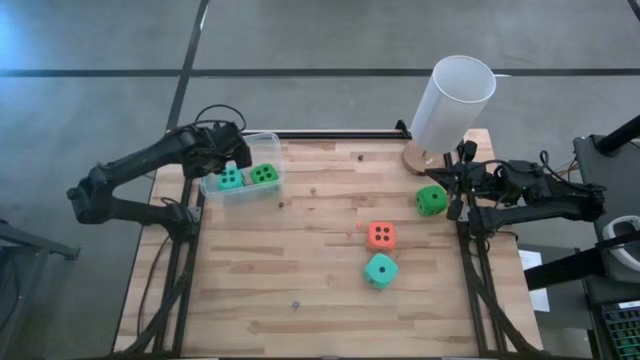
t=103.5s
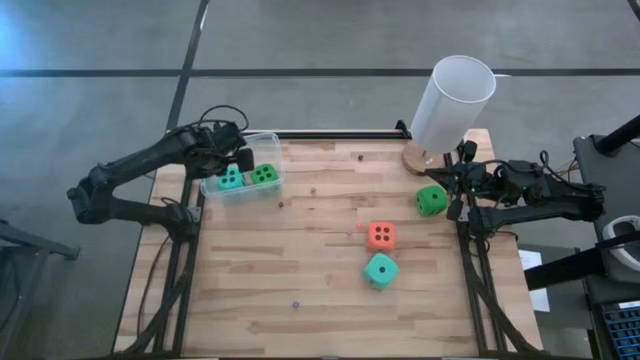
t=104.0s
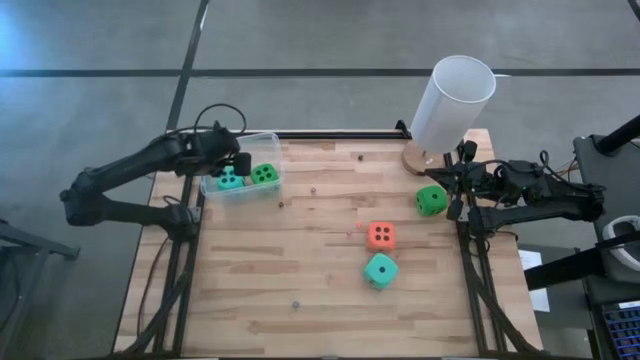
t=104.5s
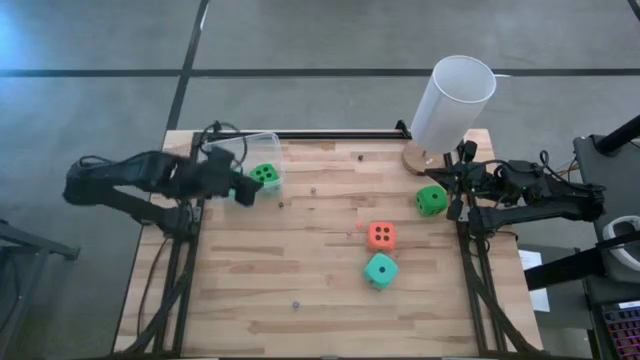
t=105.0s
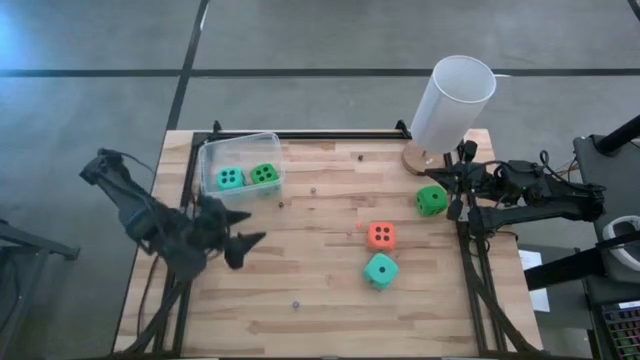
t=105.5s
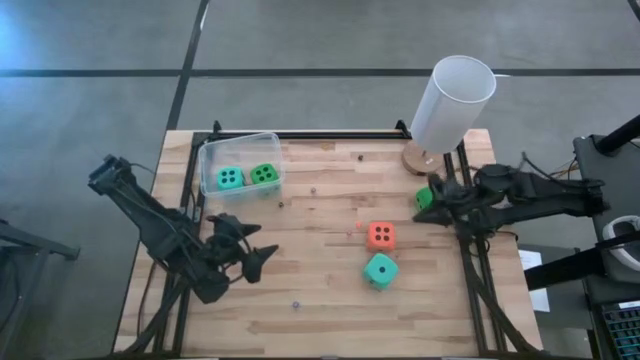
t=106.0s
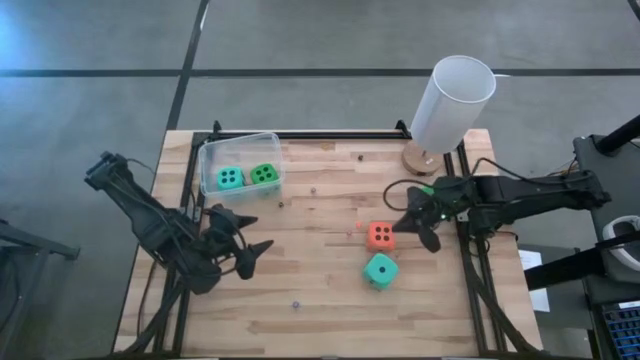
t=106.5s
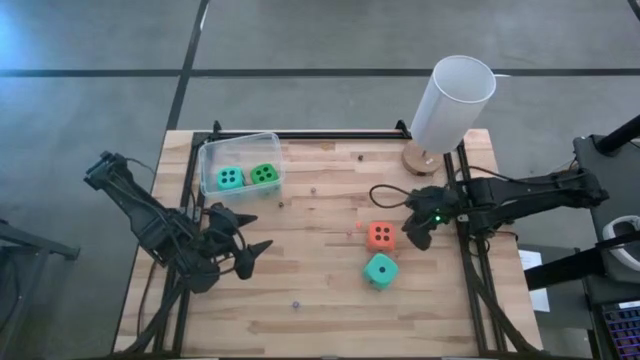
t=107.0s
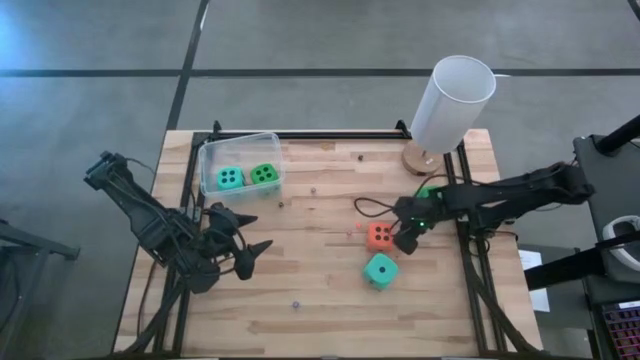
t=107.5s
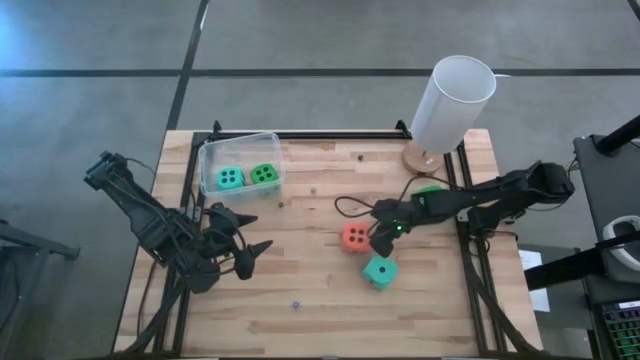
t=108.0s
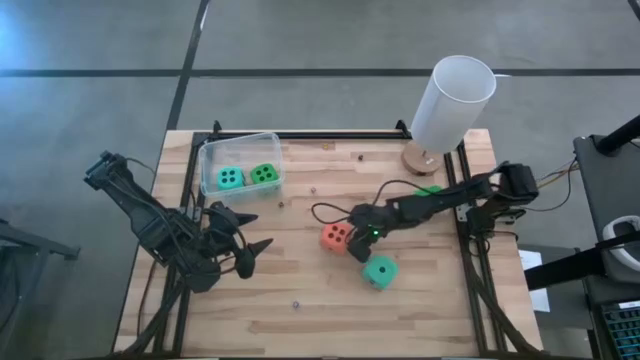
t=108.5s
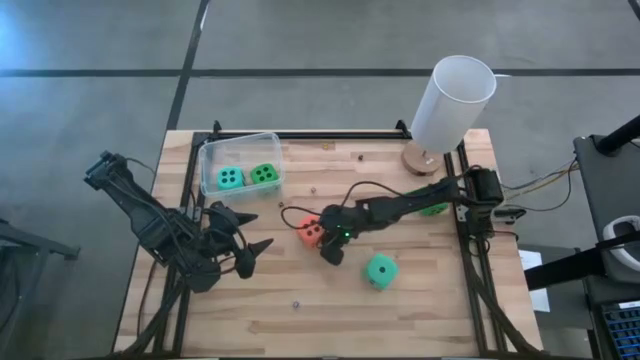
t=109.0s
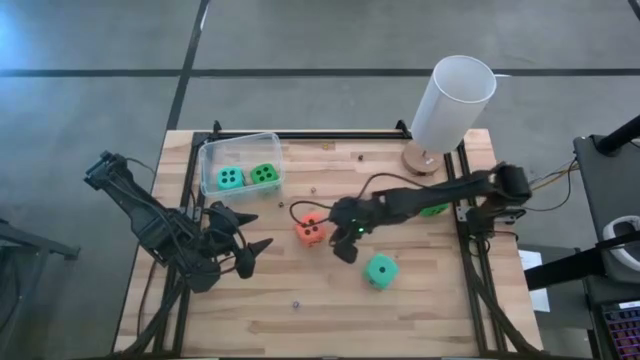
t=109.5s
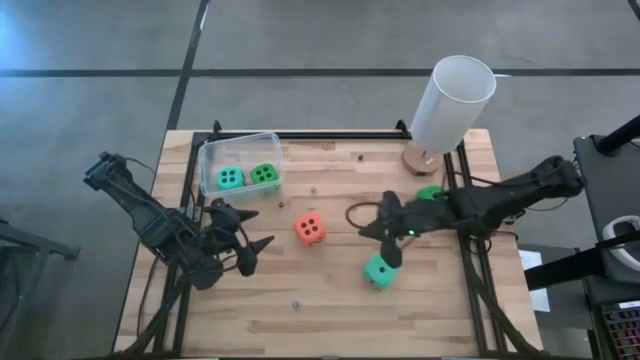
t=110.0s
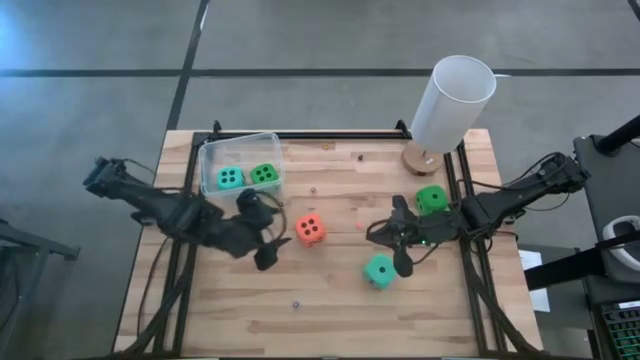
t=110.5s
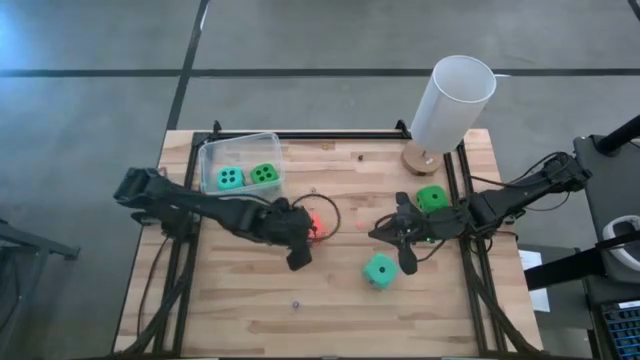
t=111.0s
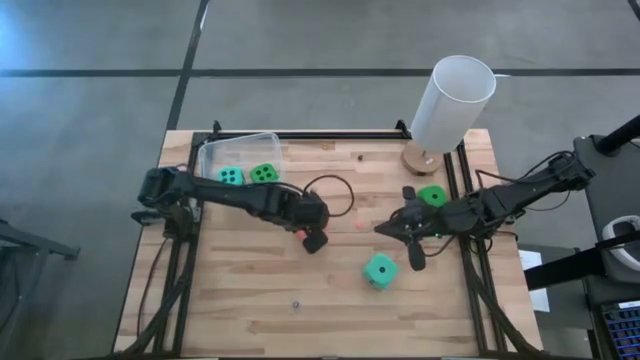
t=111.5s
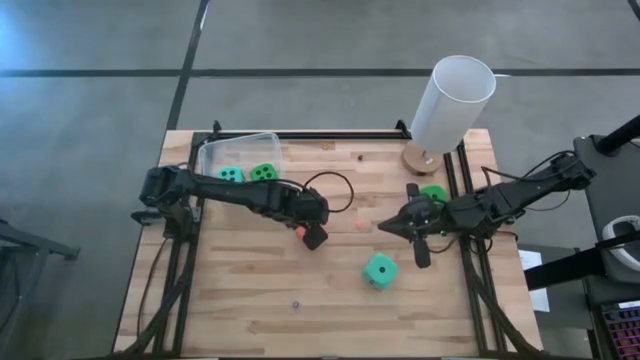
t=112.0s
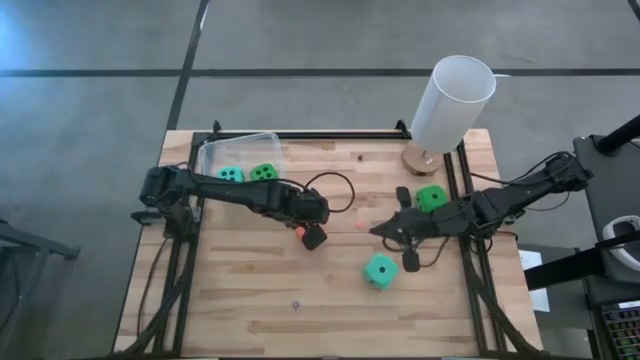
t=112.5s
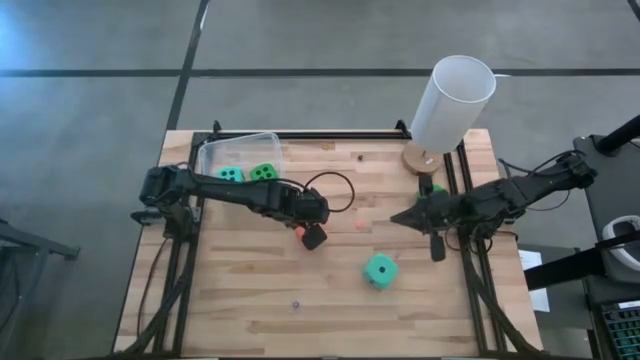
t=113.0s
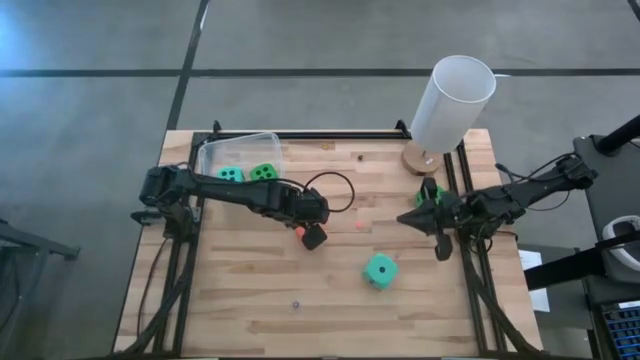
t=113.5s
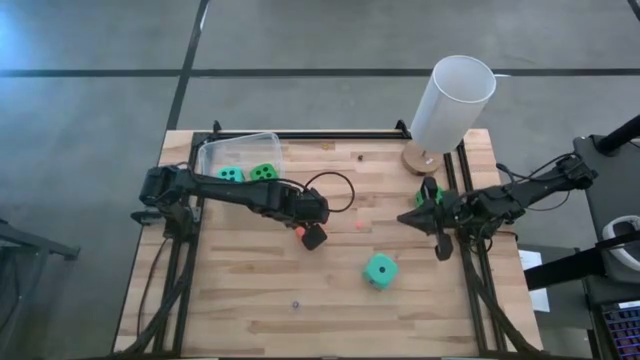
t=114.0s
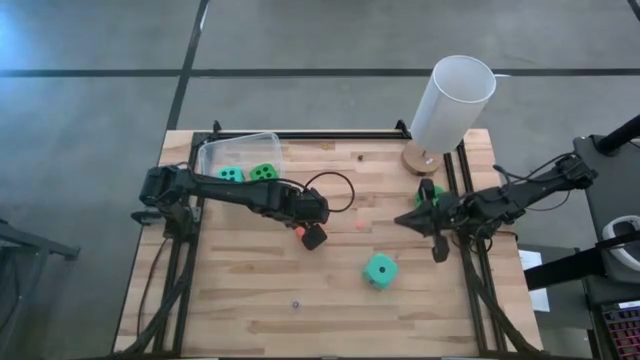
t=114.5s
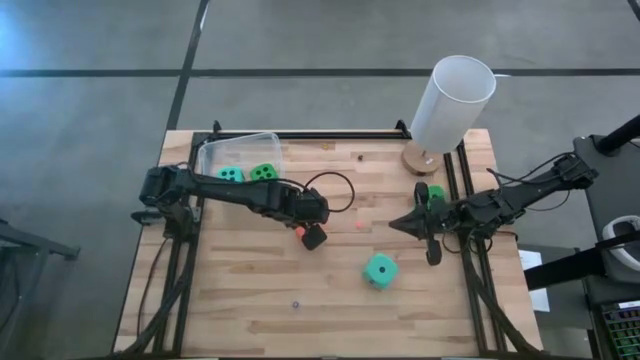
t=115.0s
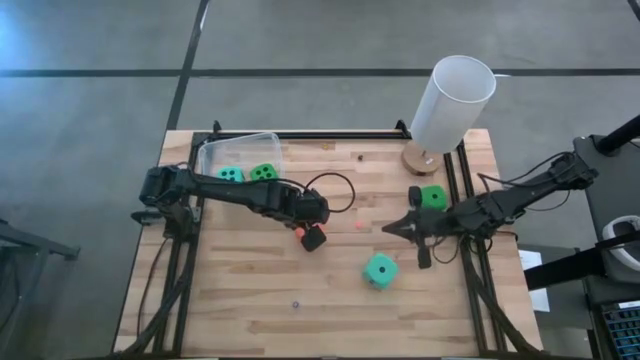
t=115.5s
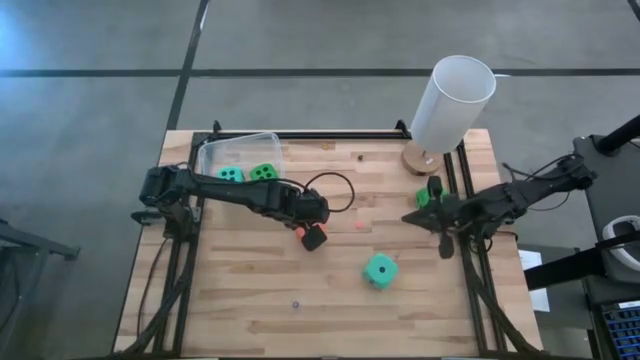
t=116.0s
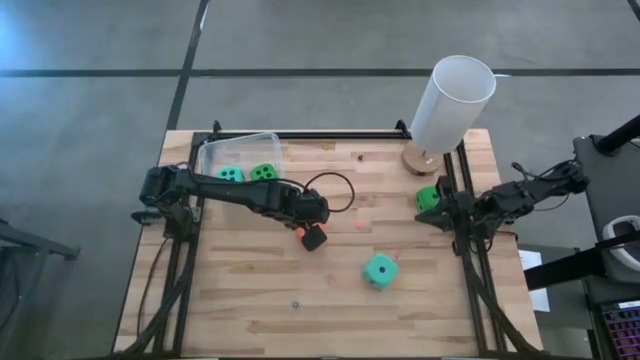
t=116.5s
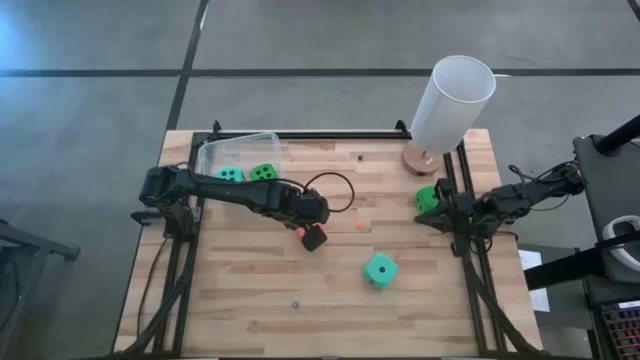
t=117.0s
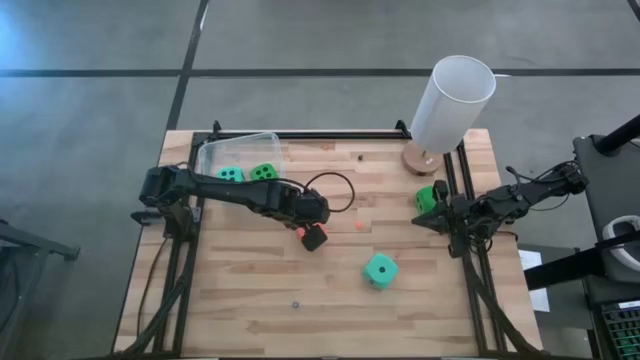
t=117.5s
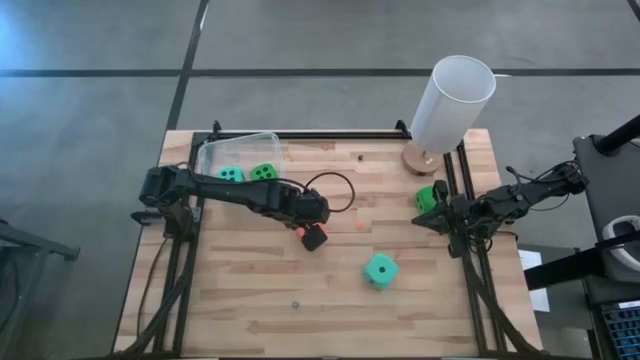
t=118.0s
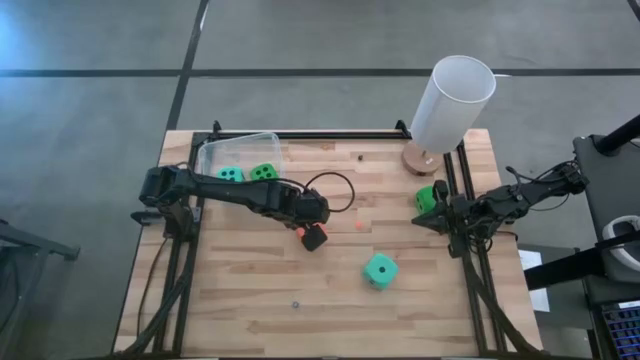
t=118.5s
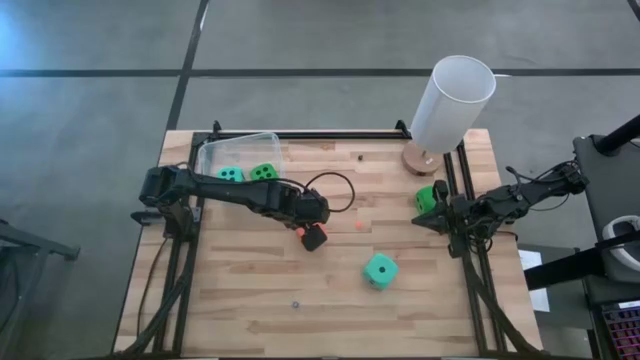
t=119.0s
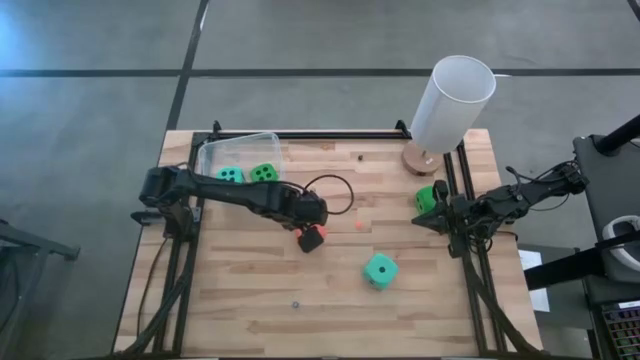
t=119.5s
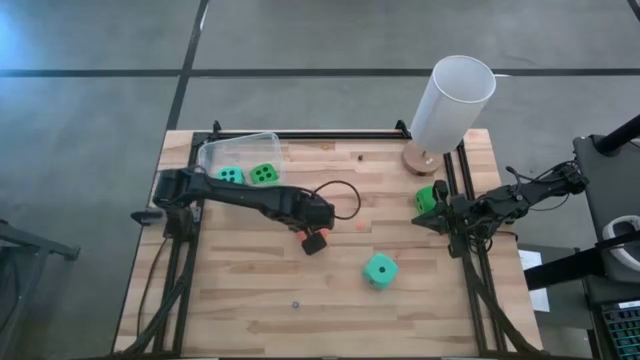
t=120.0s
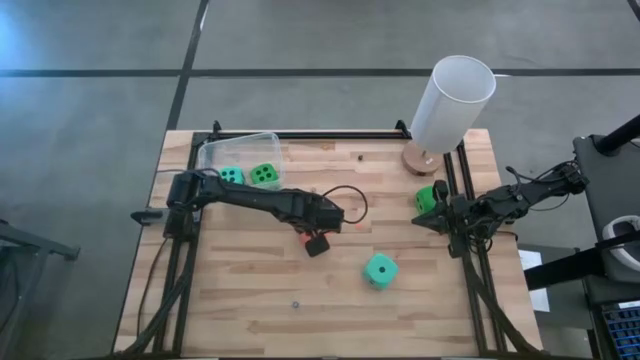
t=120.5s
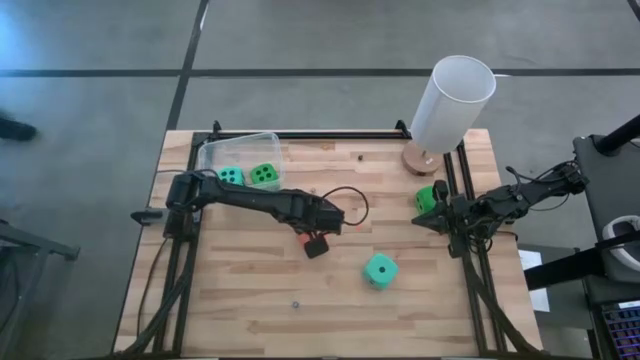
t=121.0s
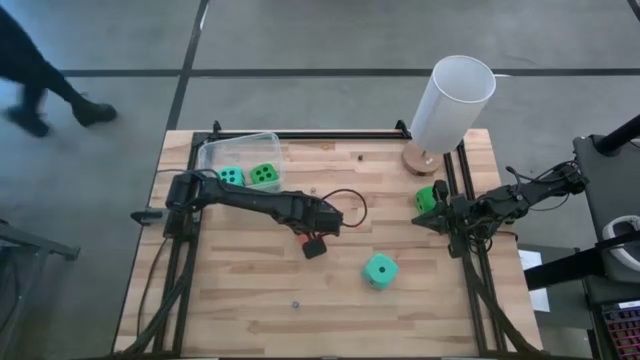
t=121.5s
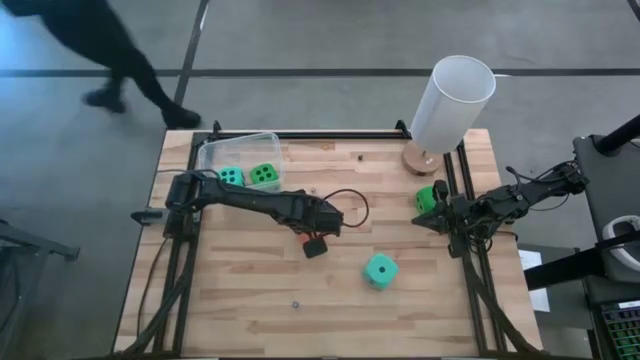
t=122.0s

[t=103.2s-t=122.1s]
Task: Pick & Place Dice
Put the orange large dice into the transparent bin

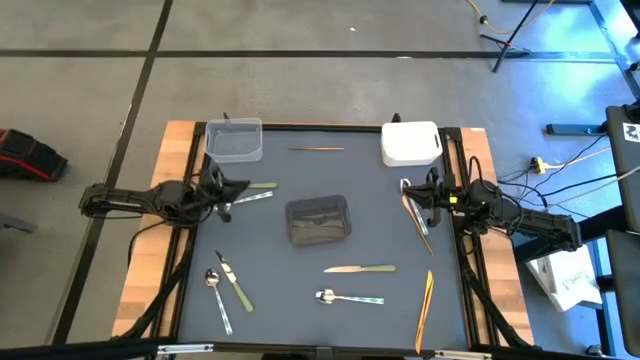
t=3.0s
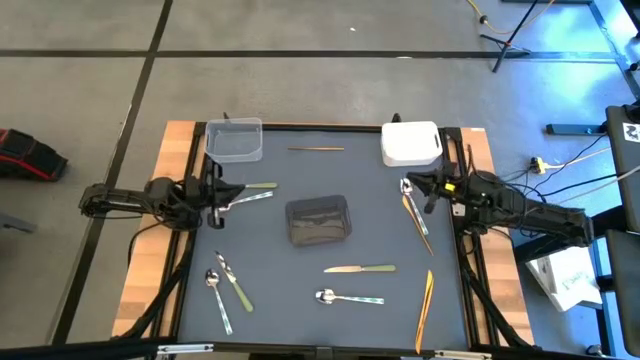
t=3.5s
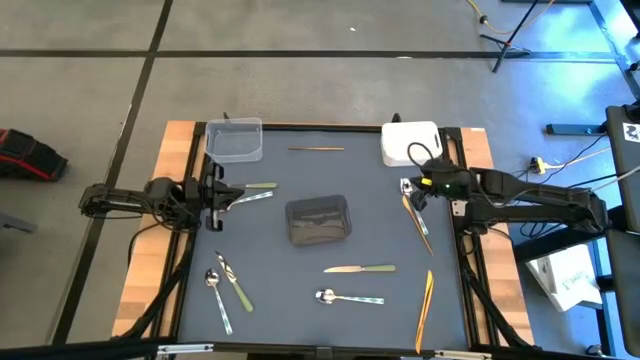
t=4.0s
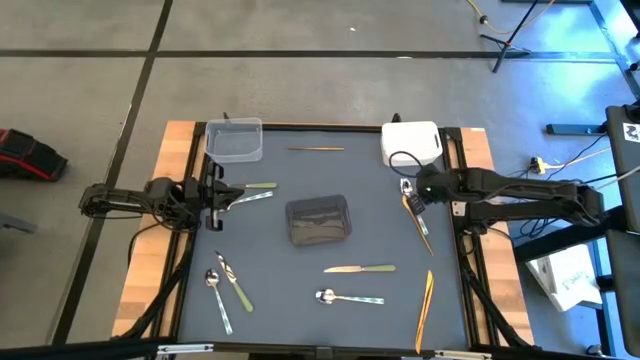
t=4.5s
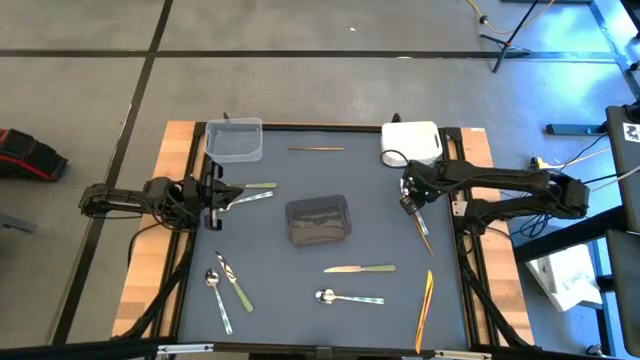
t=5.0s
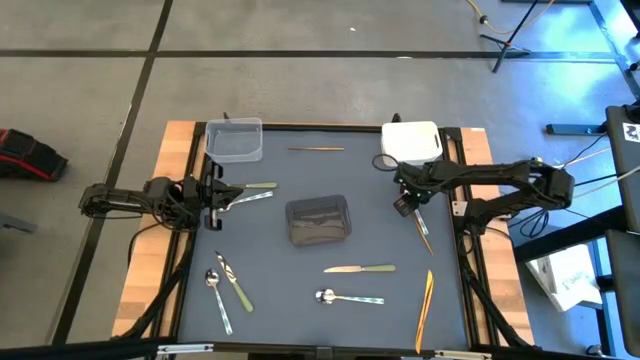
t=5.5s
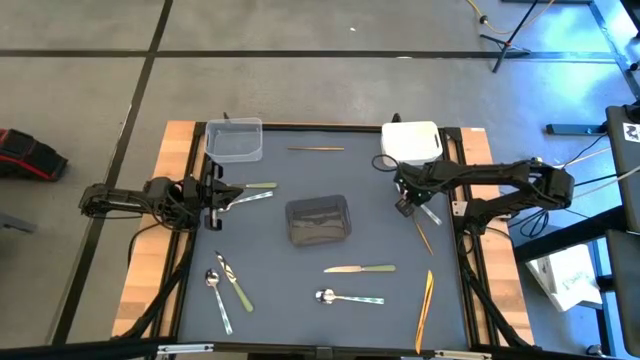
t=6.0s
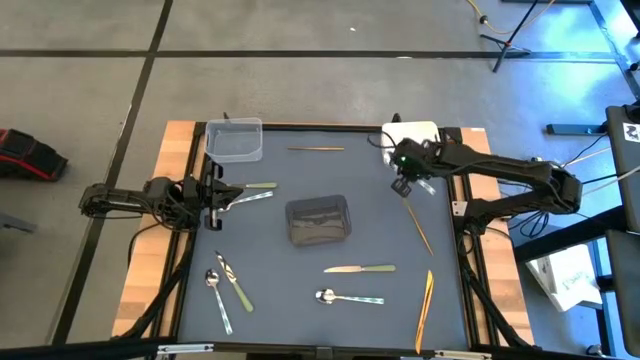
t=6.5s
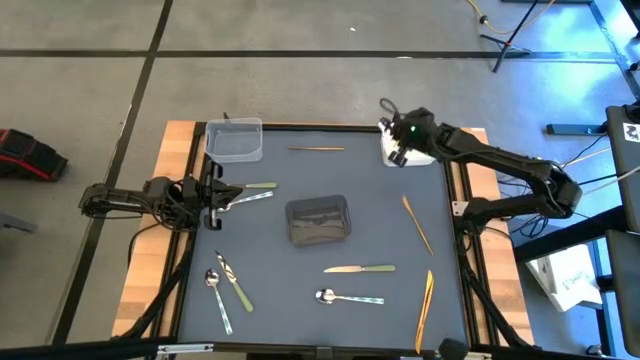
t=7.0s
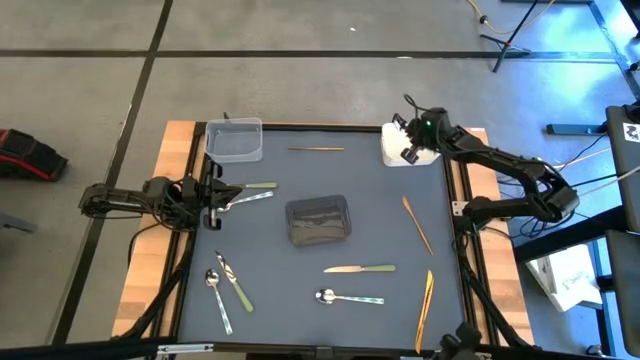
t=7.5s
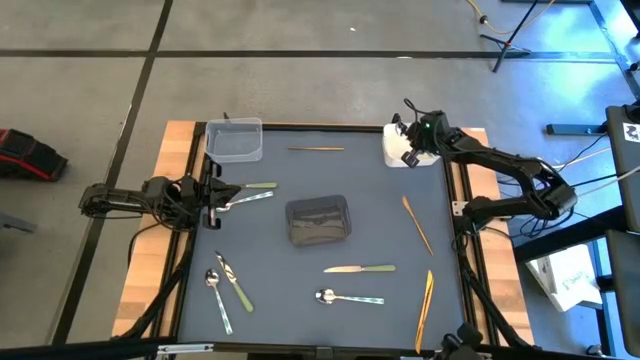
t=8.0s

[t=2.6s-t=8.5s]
Task: Sort silverware by color (type)
Put the white green spoon into the white bin
